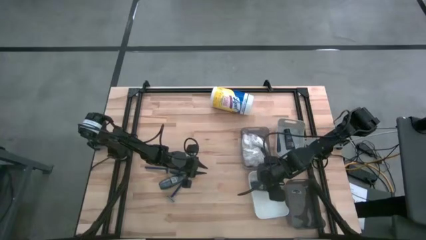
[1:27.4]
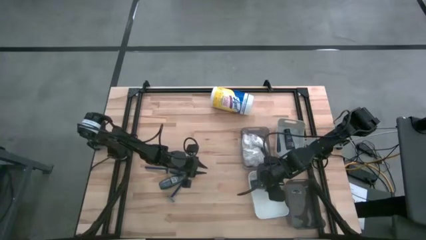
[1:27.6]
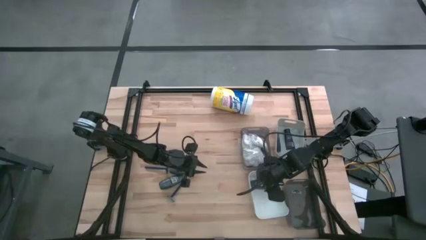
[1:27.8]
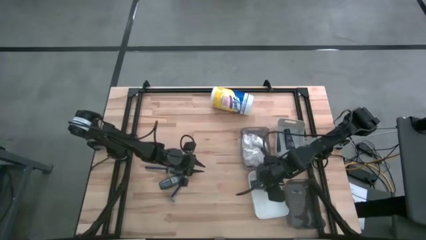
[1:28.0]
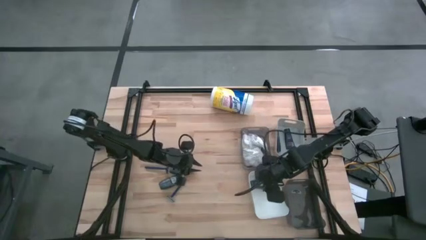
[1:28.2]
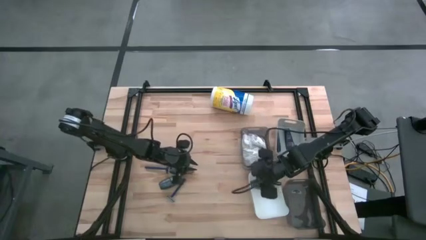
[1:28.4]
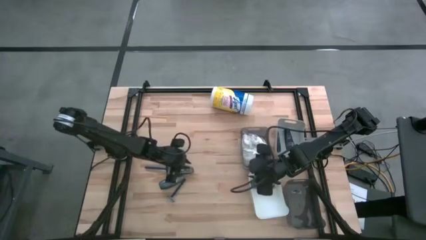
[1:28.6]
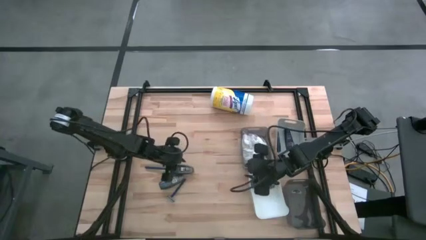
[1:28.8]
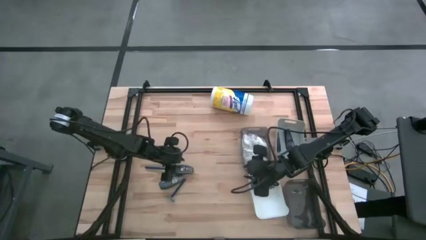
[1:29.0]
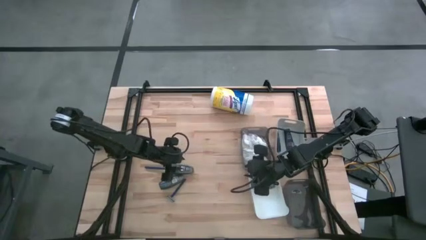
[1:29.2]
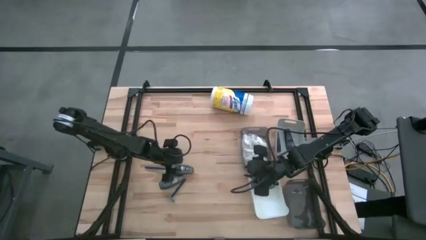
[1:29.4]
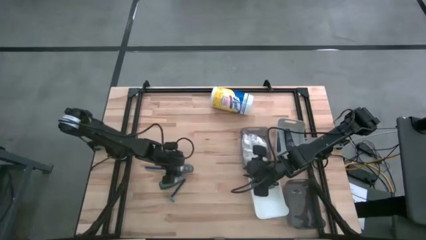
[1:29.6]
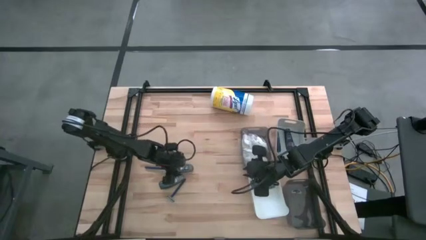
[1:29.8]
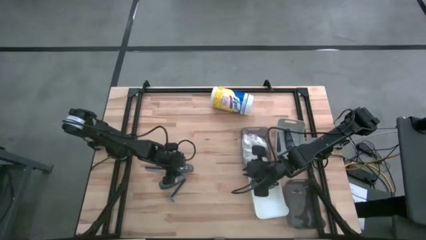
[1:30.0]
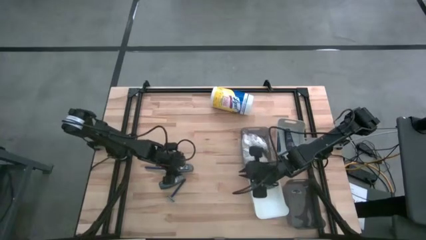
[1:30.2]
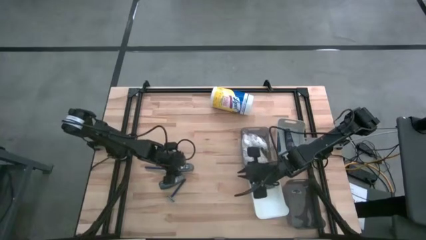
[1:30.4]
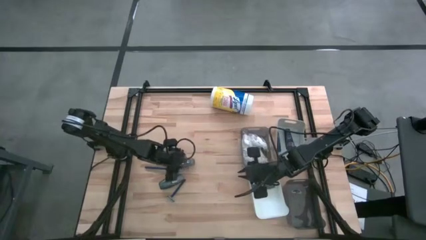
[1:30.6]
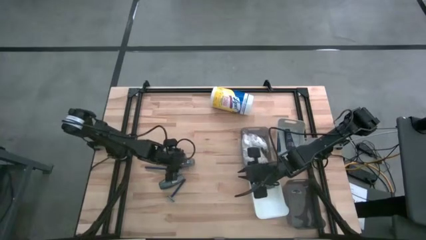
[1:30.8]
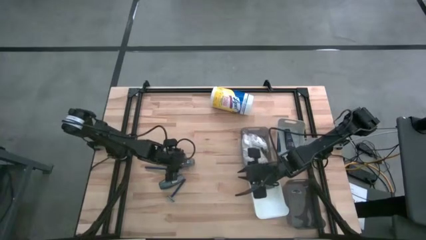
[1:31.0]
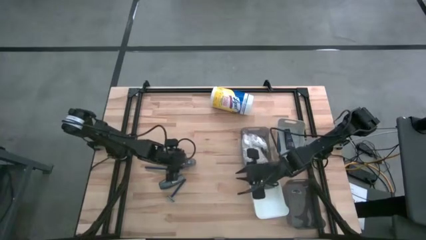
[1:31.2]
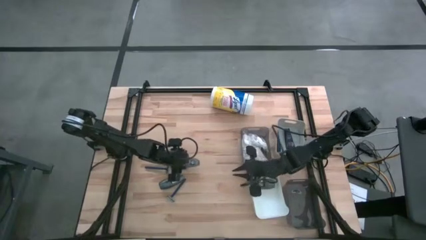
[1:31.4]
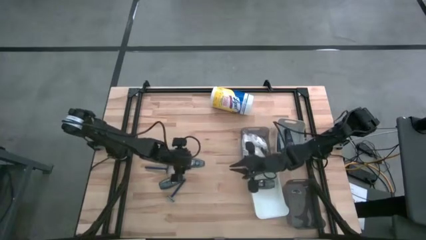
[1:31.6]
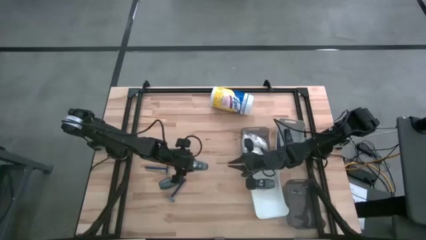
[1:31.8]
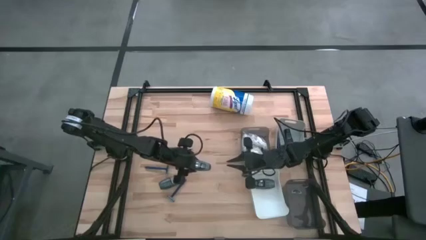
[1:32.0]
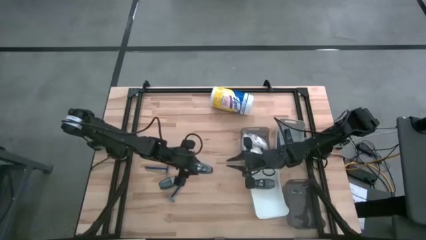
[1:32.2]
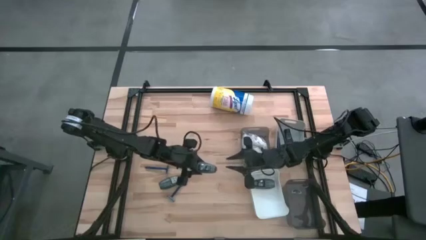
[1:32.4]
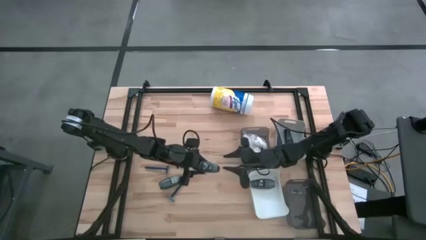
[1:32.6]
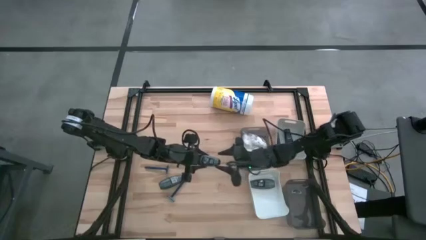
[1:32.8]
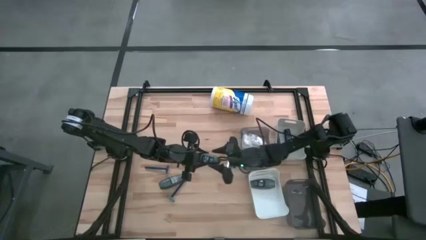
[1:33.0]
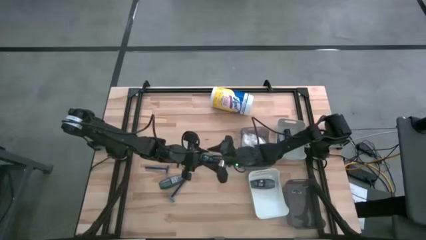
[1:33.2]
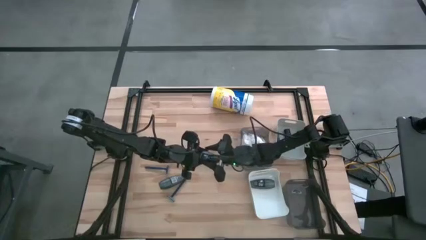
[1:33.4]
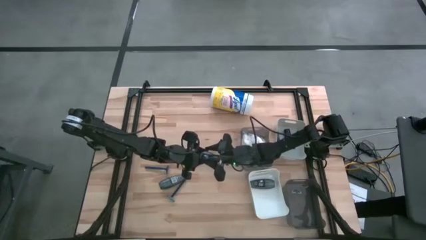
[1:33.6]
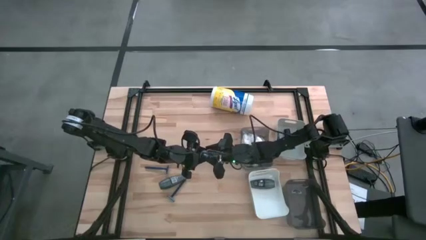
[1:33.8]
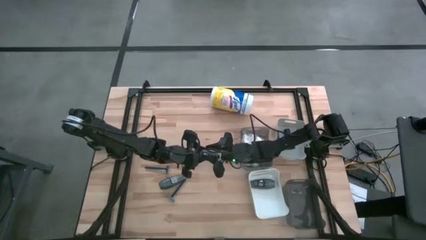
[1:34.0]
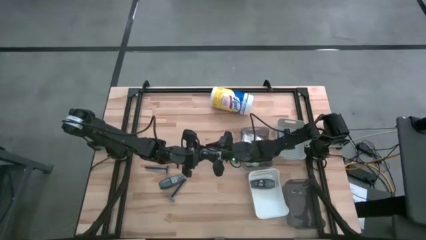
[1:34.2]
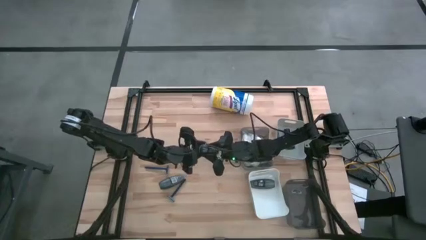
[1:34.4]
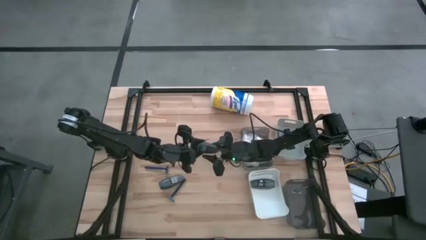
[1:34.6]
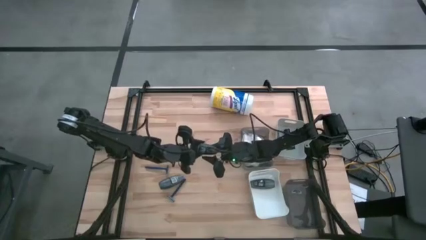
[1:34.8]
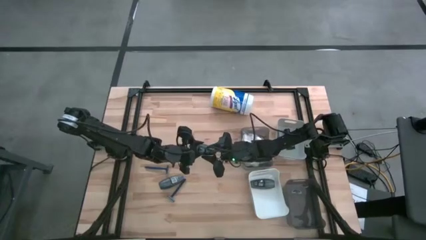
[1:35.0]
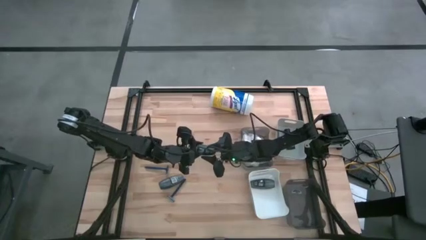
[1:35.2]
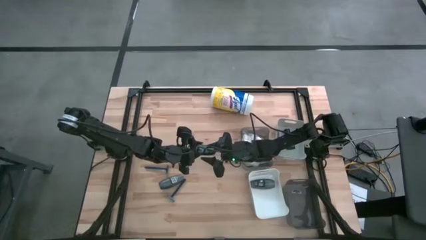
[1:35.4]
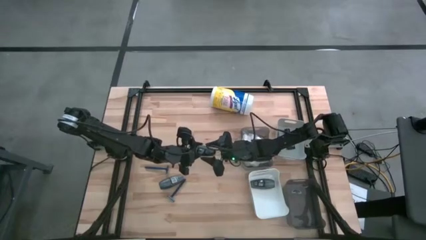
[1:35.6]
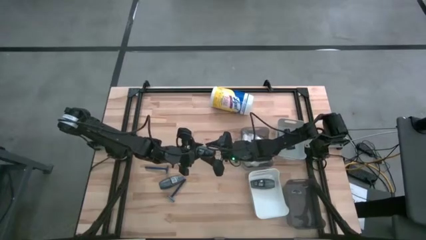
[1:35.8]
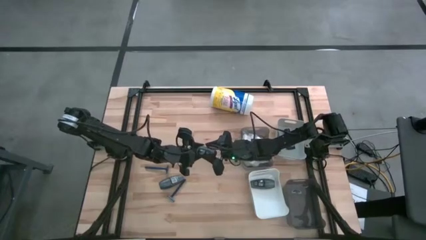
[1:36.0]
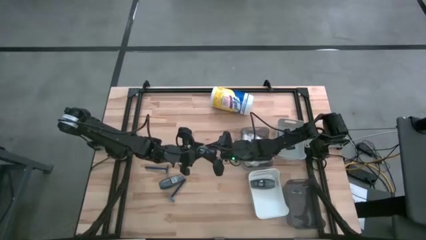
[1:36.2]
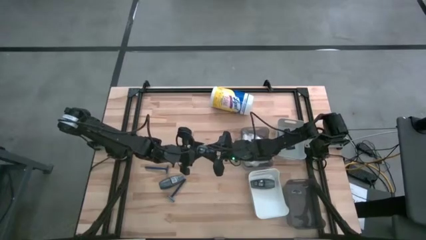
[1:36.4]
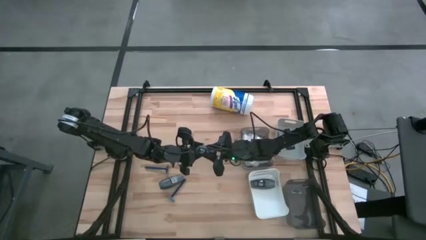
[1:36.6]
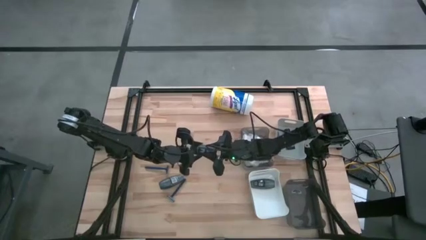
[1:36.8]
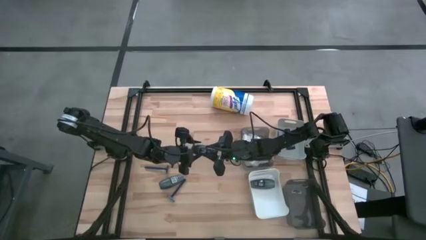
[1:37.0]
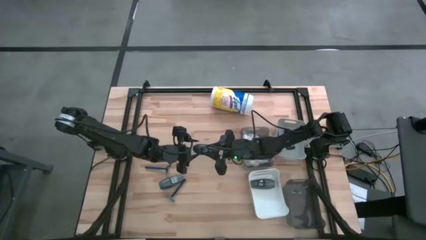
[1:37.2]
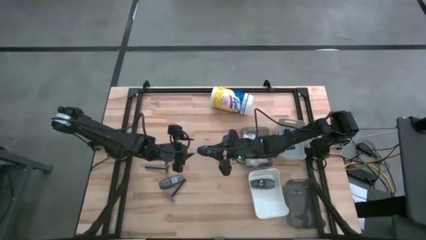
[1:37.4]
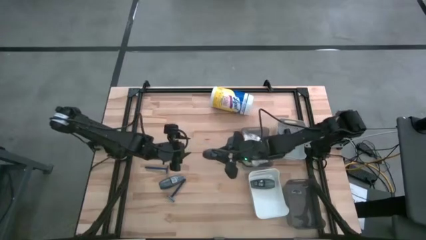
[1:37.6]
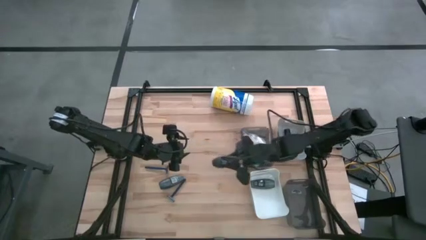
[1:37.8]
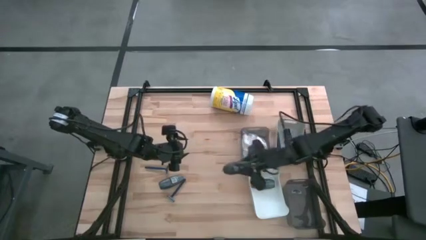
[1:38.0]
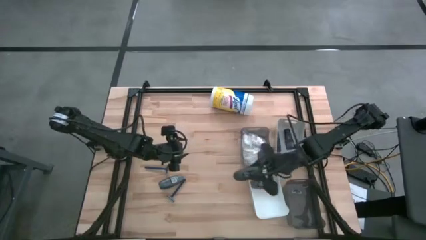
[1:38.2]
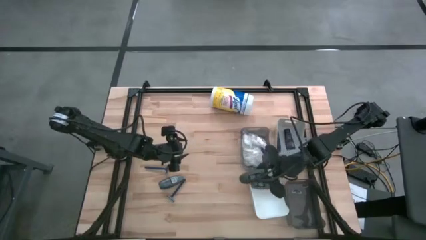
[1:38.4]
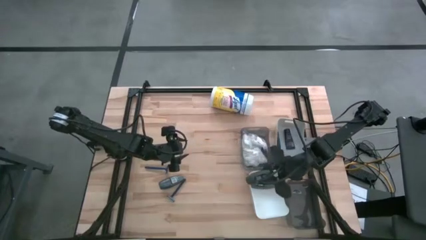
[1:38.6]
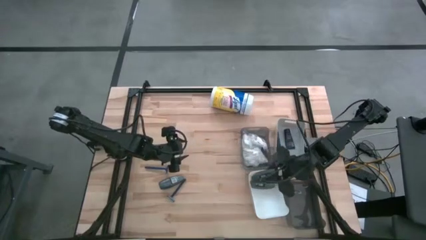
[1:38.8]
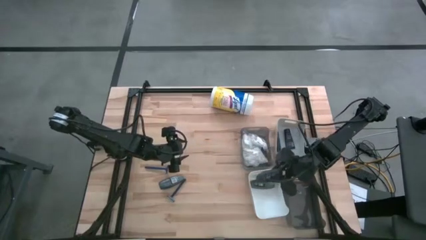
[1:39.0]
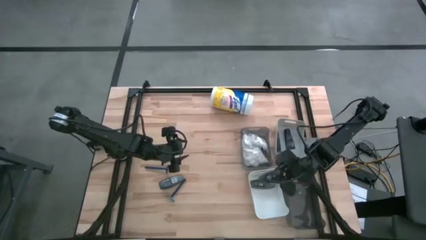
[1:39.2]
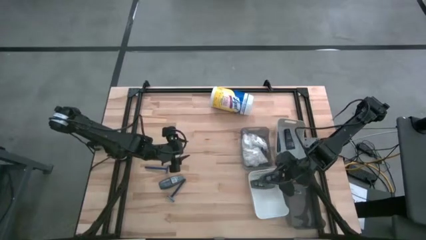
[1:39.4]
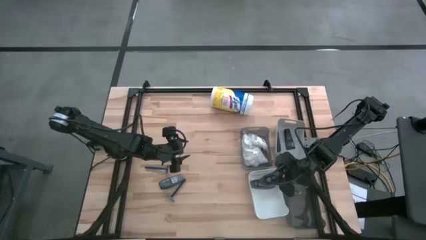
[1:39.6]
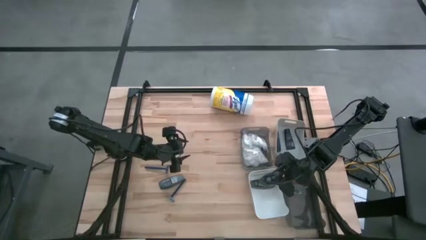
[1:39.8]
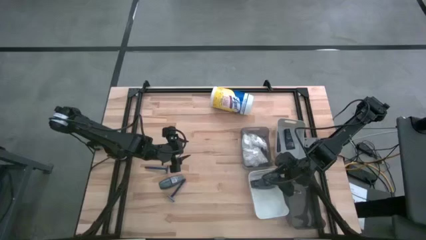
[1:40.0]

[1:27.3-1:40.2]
Task: Pick & Place Travel size toiletries
Put the top deodorant into the white bin

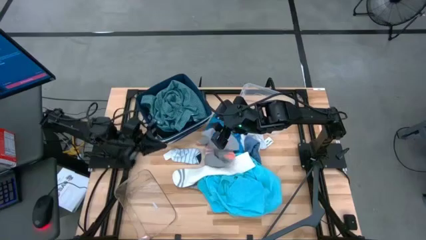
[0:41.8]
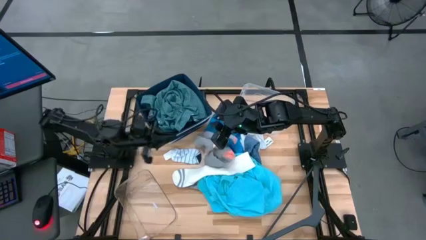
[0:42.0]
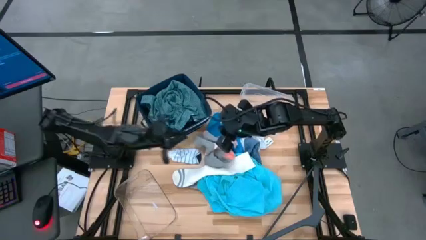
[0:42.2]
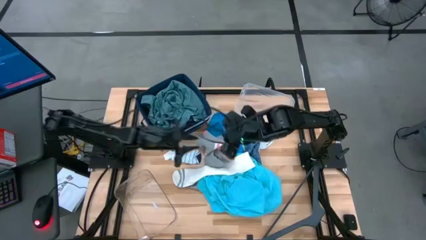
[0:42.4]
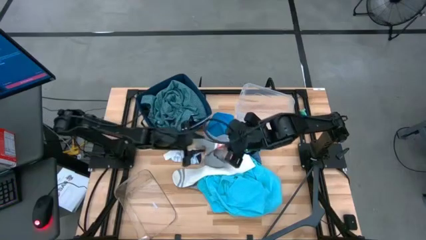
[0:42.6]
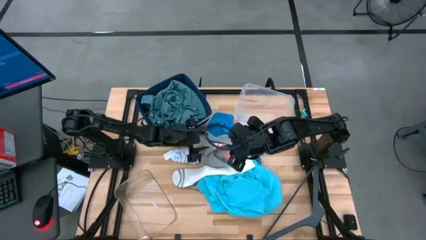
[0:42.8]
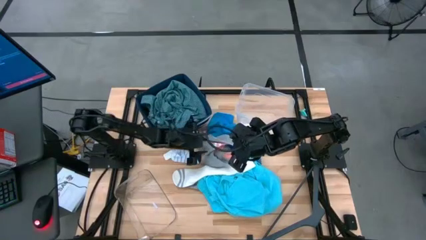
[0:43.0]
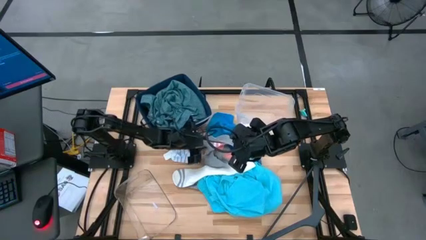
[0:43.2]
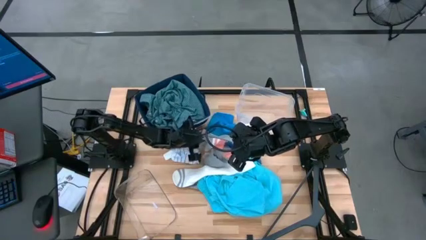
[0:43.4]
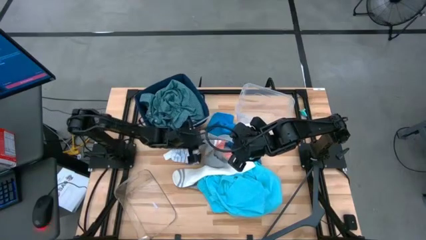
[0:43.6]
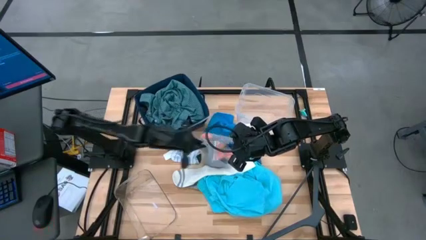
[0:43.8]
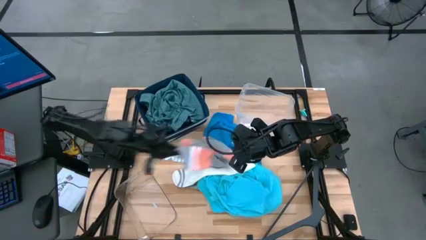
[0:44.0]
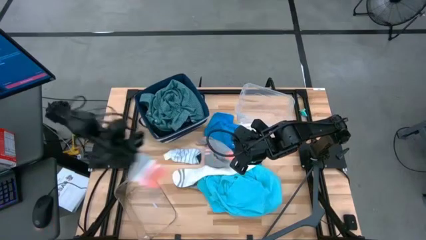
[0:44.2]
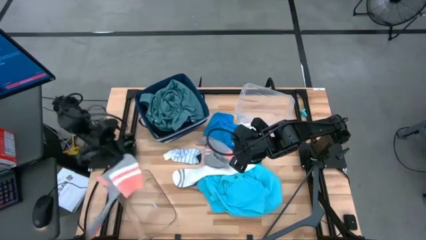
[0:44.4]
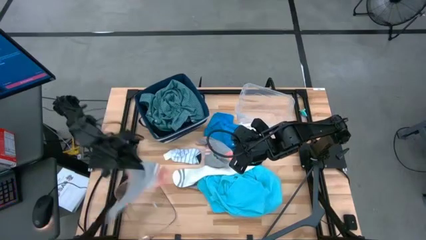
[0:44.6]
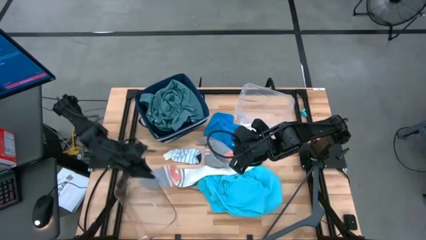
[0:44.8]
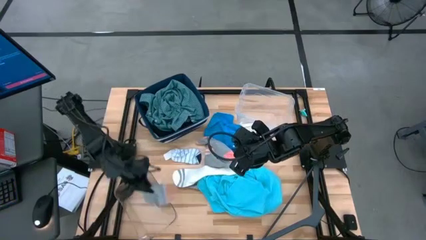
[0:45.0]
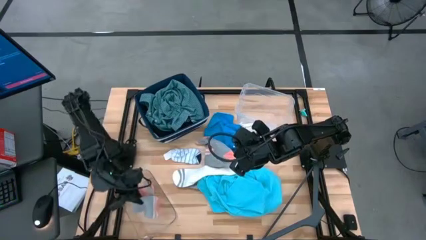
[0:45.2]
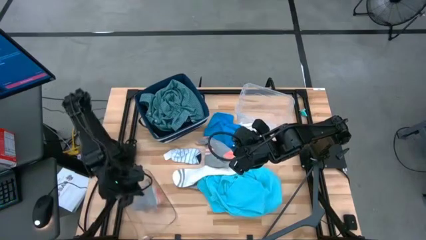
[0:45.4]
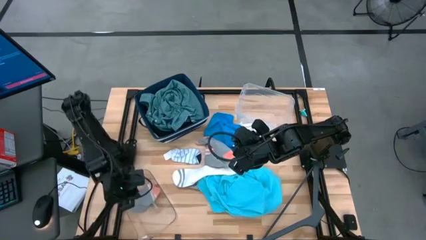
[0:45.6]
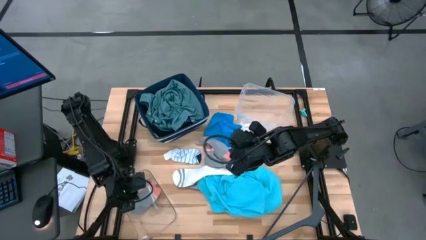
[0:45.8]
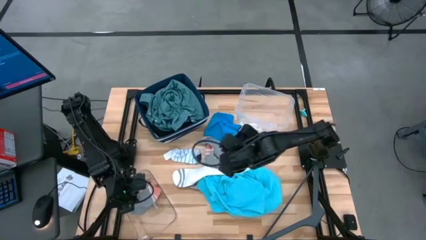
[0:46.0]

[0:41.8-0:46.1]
Task: Pick & Place Cloths
Put the top gray sock into the transparent bin
